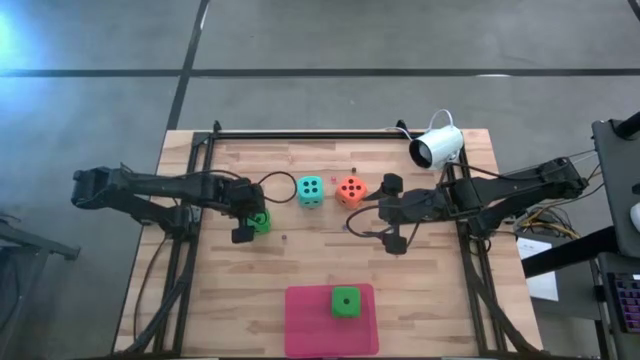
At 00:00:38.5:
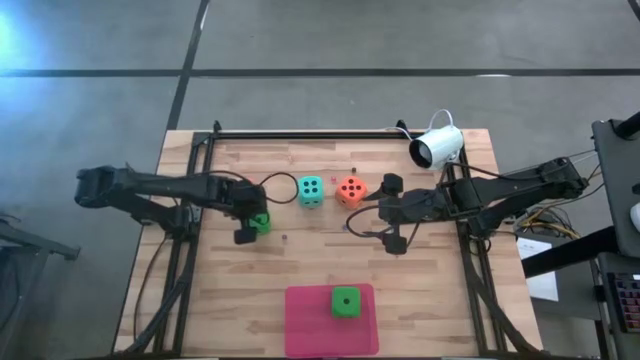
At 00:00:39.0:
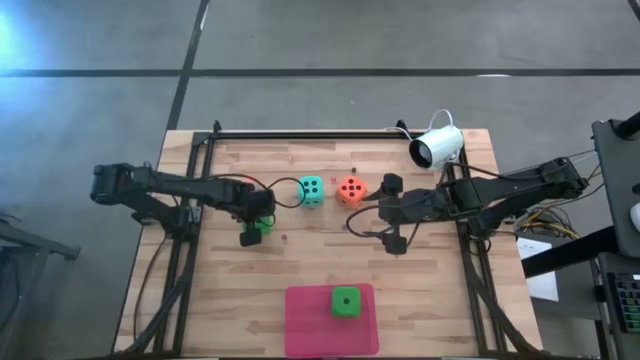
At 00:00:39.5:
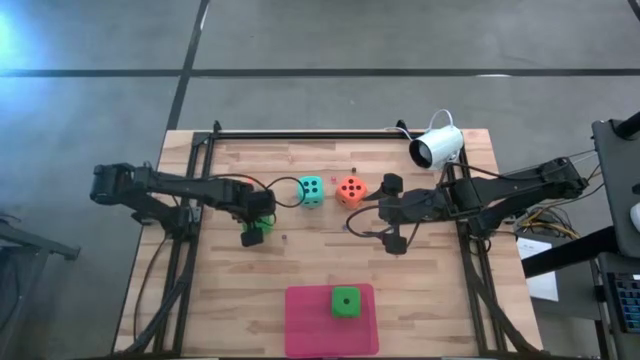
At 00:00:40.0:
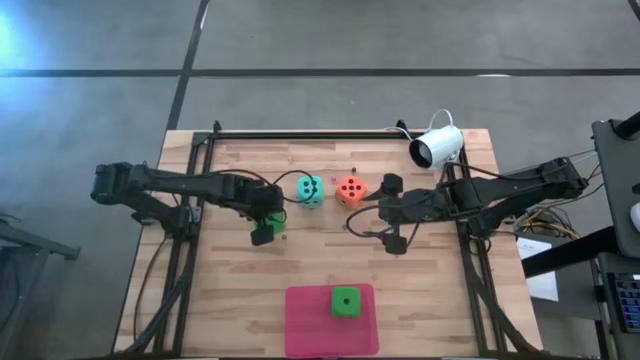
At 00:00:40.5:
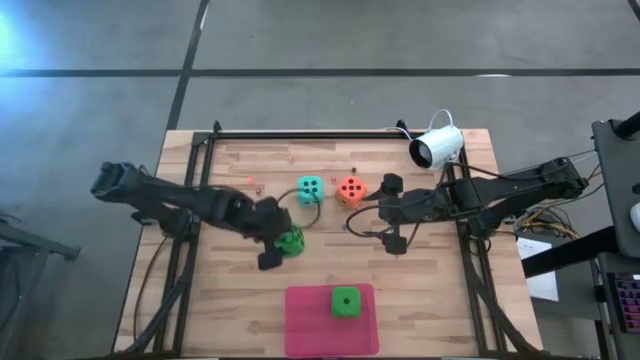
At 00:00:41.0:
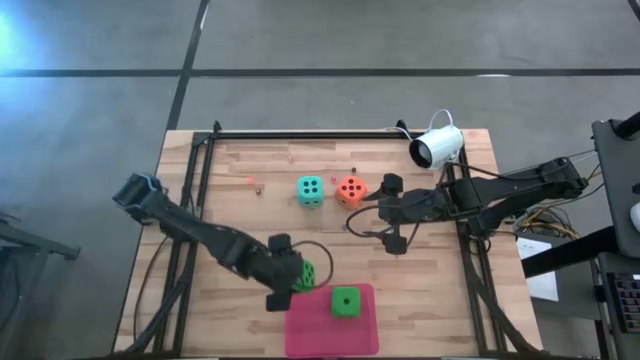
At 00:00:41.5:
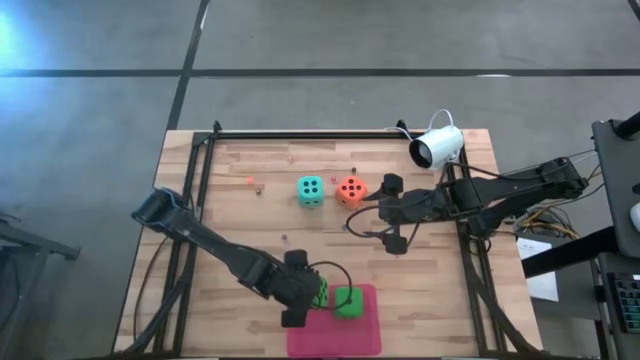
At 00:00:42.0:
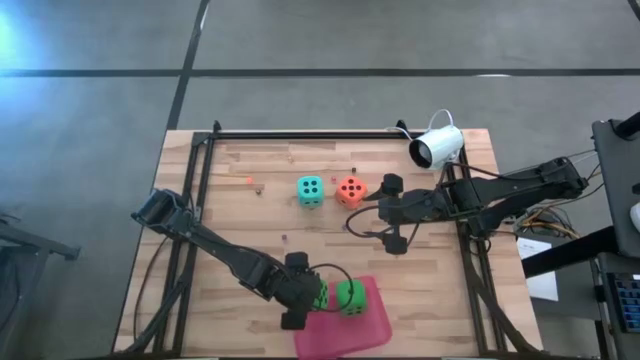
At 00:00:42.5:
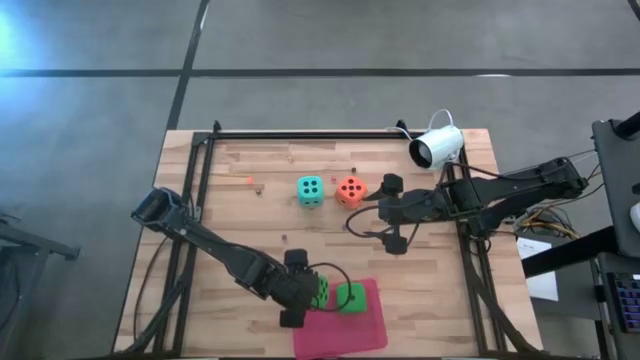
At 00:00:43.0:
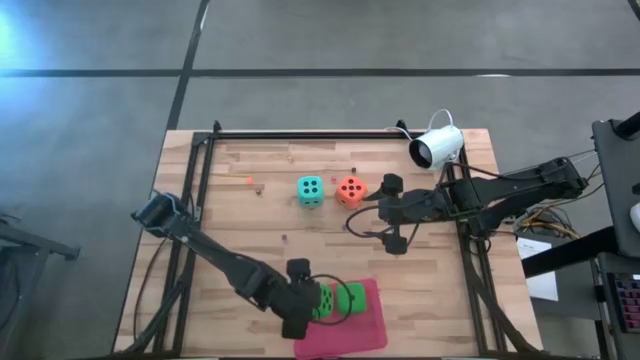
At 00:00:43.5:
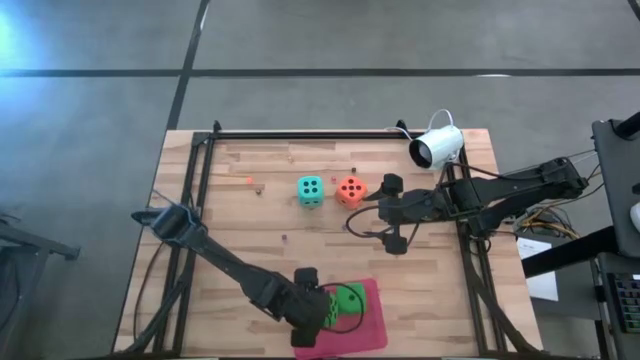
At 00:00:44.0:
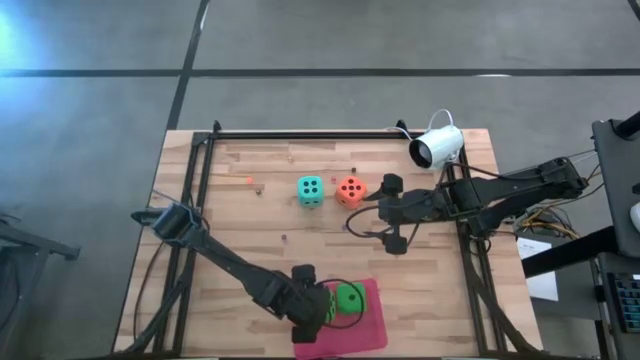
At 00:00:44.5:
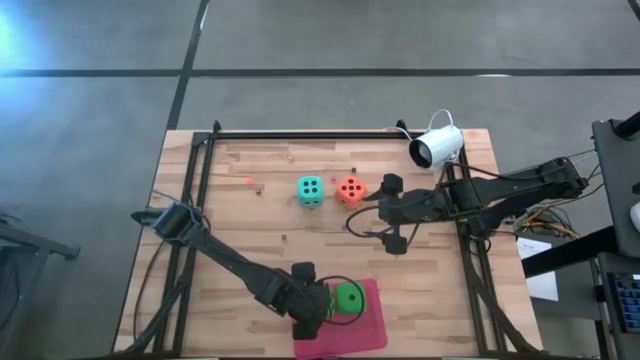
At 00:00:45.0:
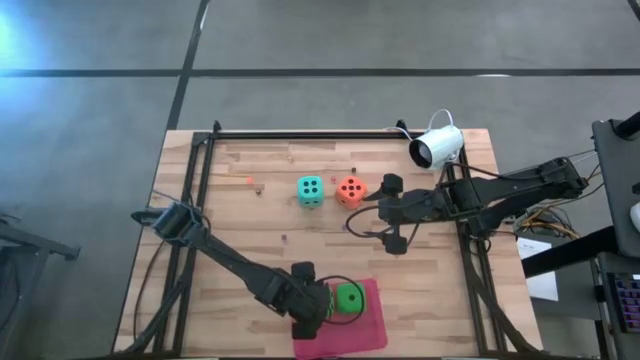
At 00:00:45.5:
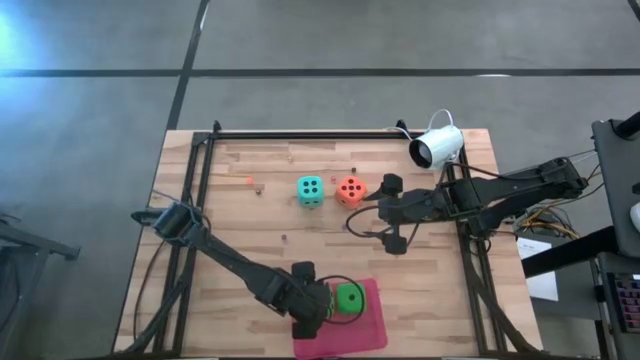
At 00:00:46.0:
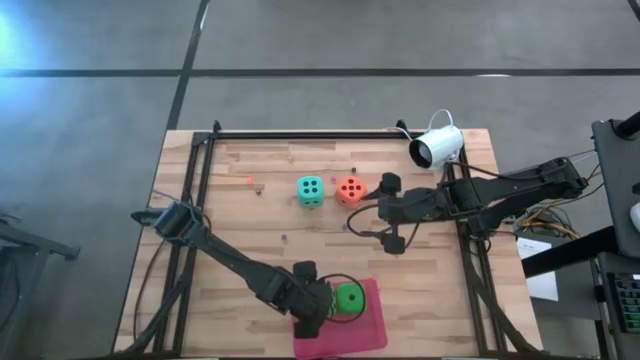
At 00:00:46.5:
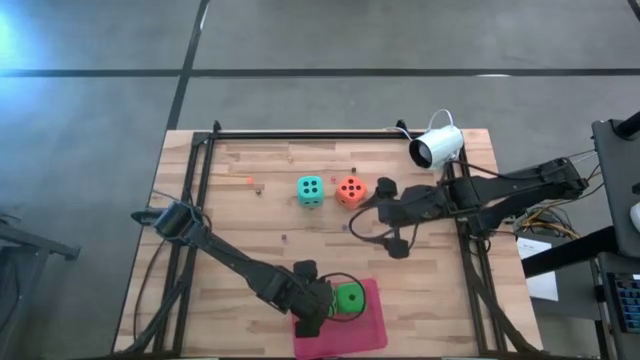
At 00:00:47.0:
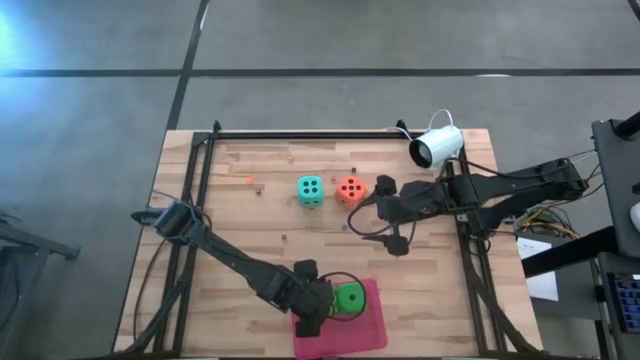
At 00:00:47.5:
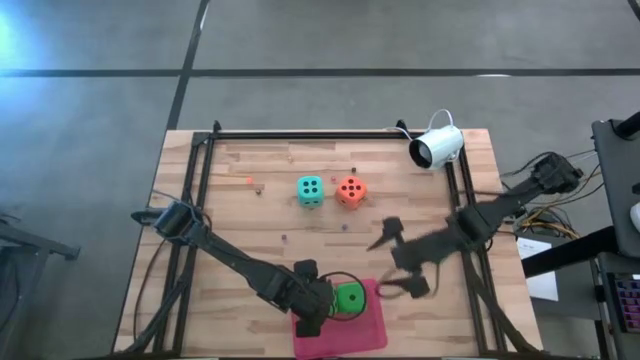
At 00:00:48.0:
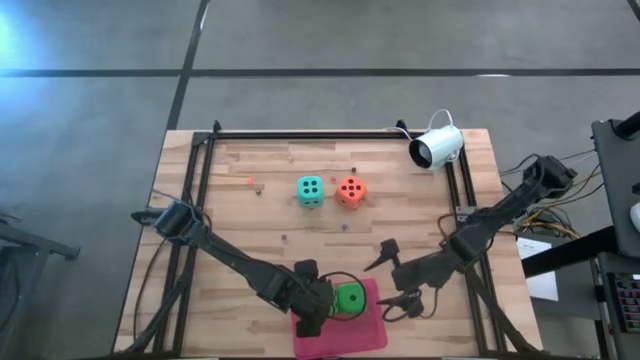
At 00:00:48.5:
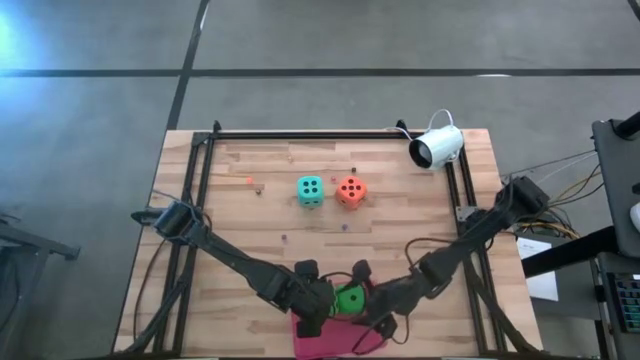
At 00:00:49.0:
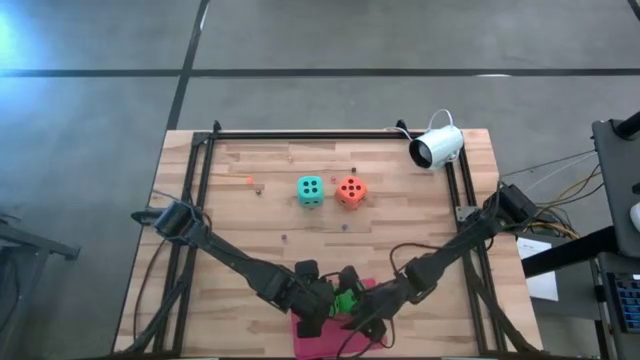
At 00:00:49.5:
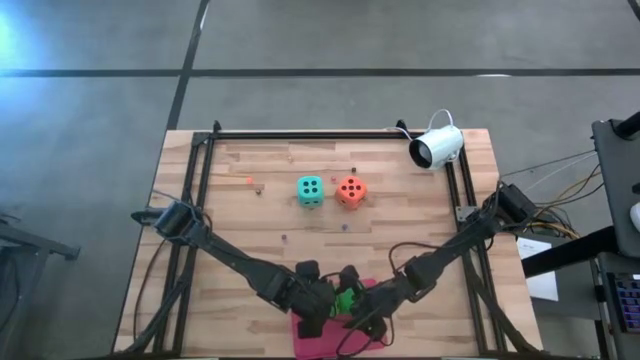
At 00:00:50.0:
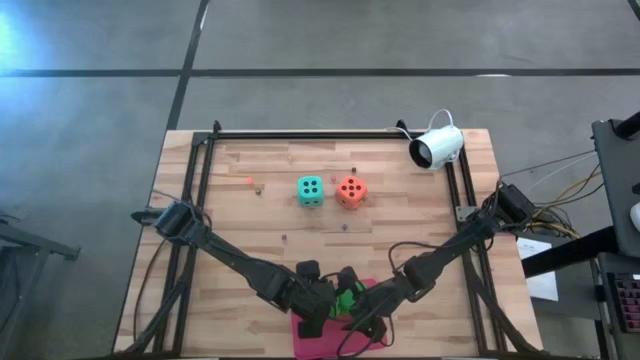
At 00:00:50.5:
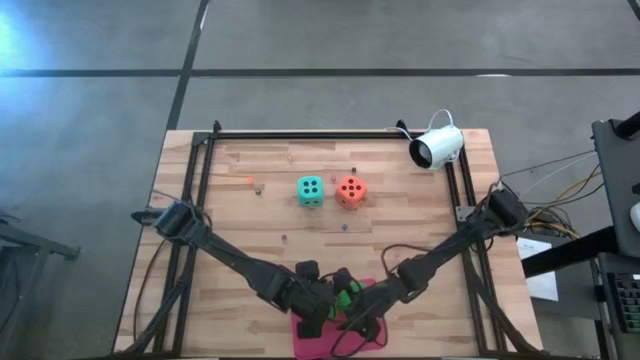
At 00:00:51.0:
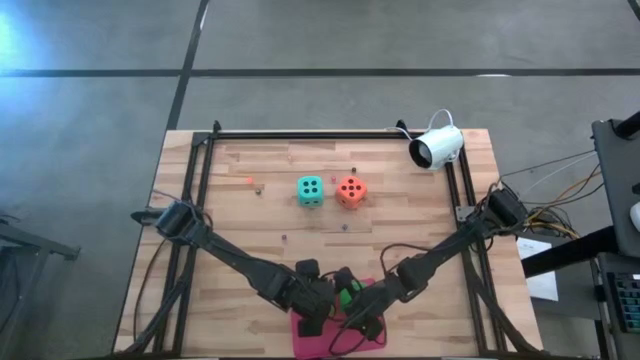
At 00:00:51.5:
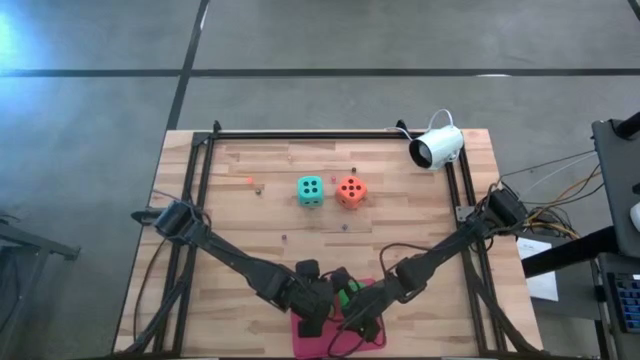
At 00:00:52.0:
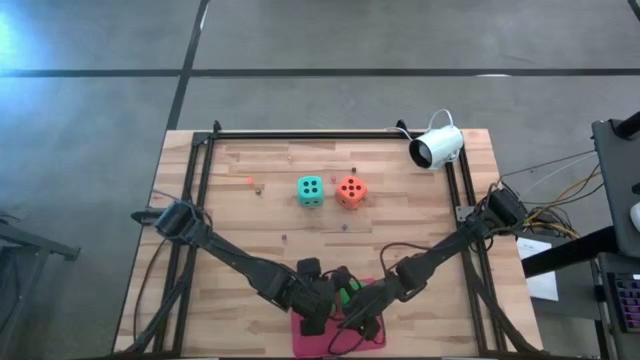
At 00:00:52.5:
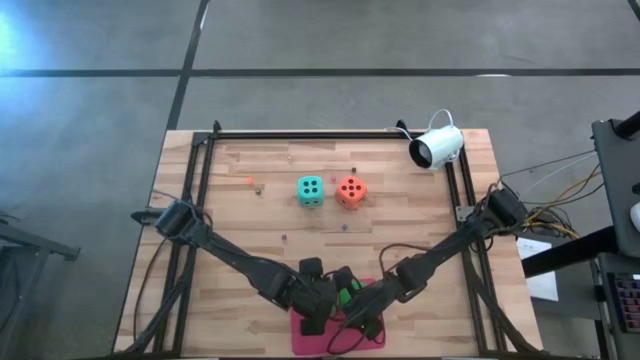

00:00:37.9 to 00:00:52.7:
Task: Pick & Place Dice
Put the green dice into the pink bin

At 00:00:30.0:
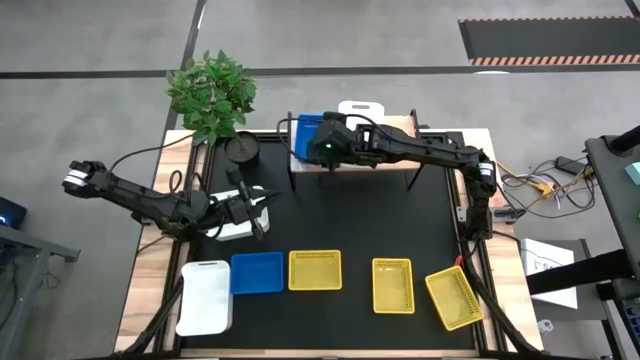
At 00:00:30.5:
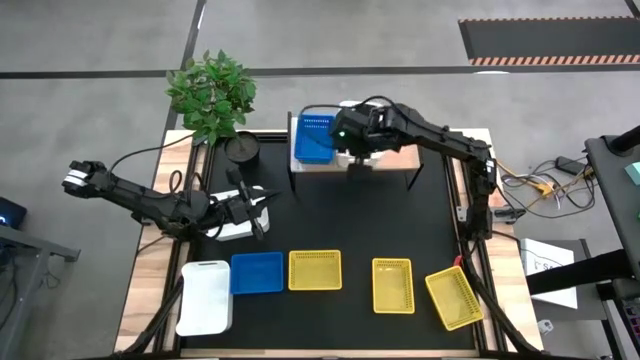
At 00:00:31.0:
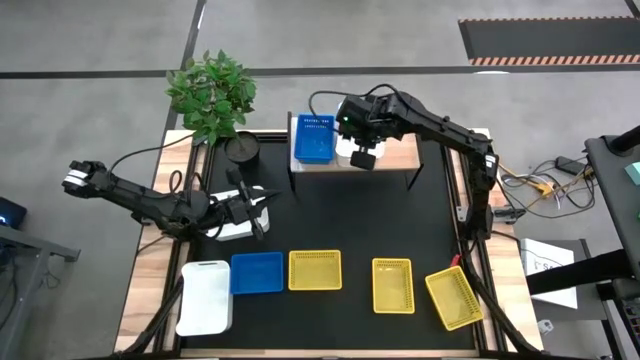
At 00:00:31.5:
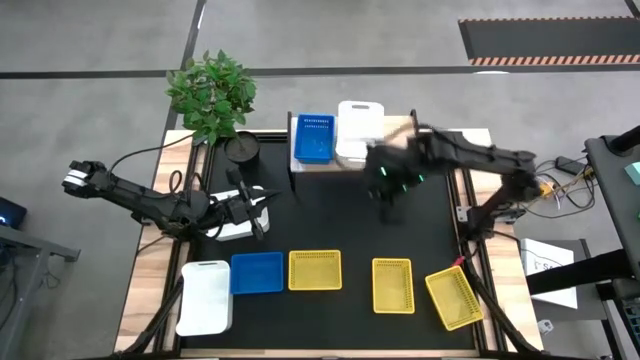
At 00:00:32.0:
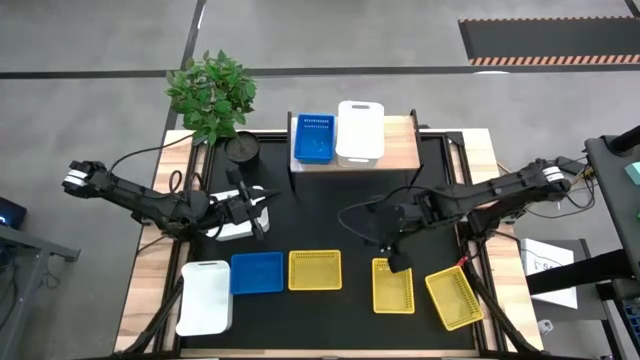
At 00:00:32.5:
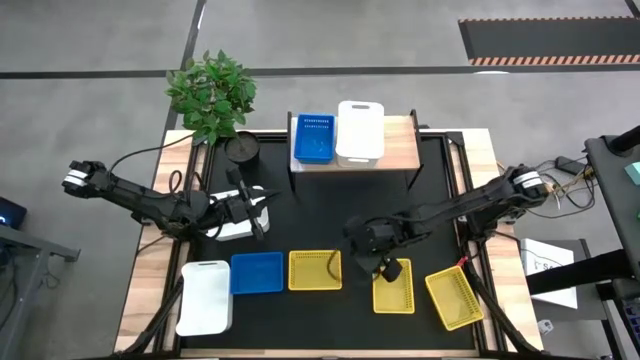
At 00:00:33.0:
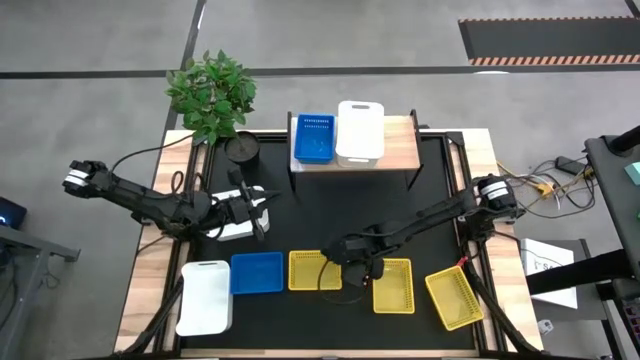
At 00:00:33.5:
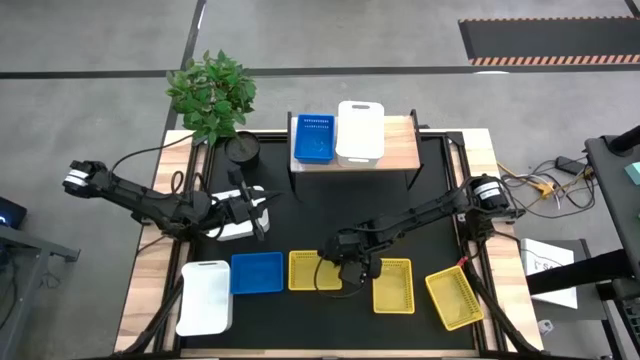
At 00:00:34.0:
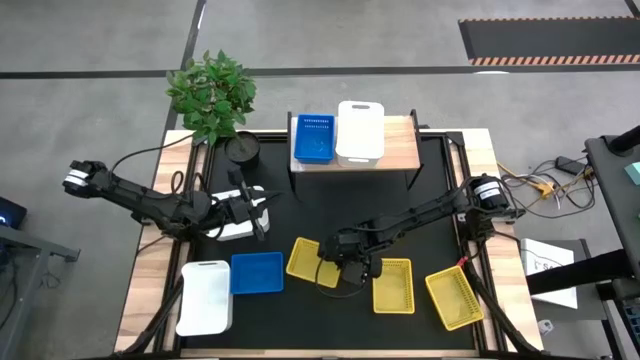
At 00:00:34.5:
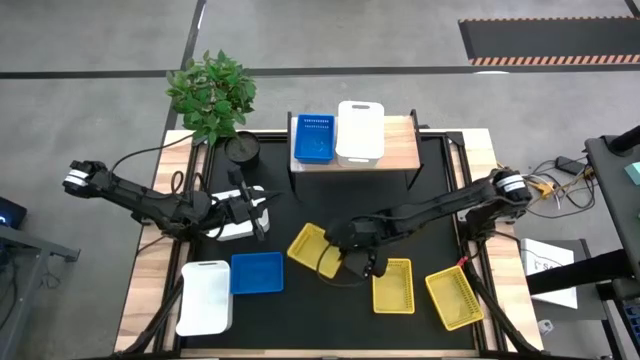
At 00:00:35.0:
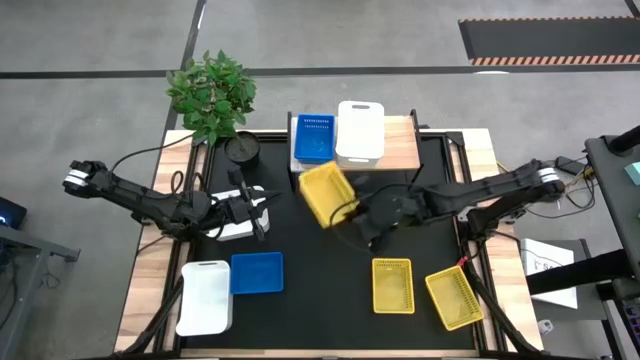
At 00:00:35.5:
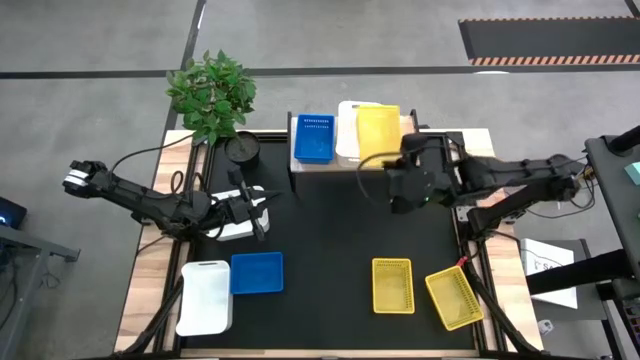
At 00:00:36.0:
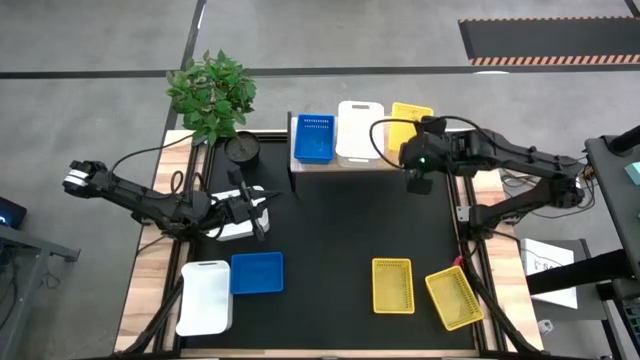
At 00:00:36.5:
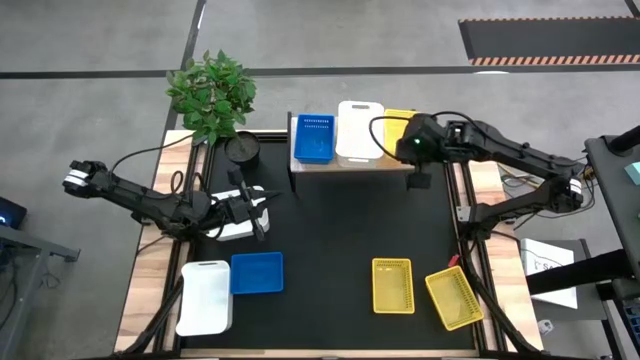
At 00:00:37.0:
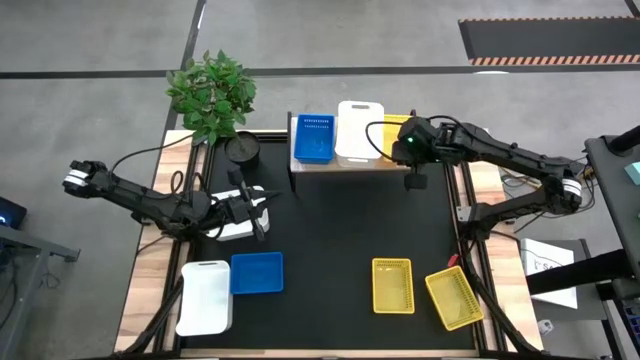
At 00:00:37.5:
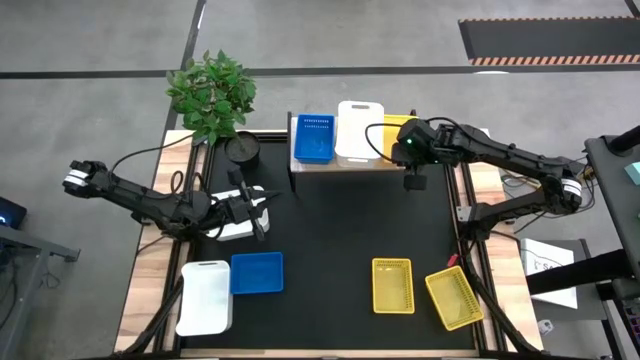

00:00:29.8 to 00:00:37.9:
Task: Stack baskets on shelf by color
Put the left yellow bin on the shelf
